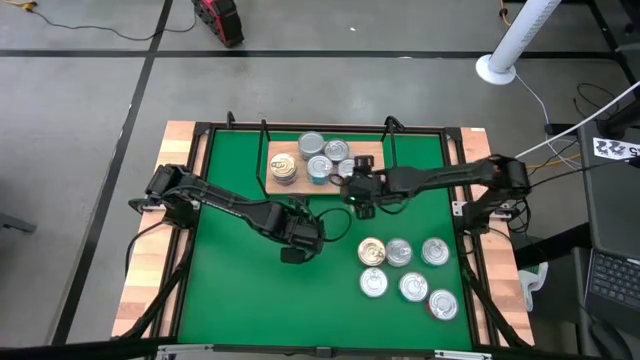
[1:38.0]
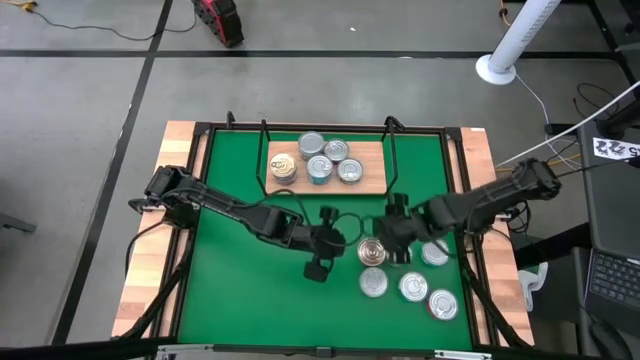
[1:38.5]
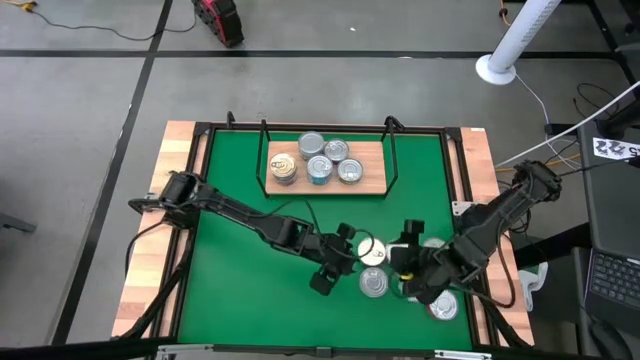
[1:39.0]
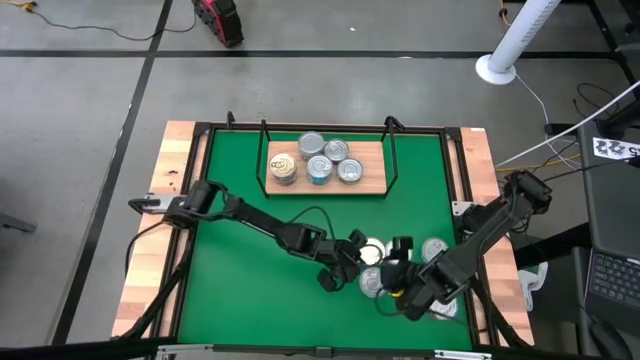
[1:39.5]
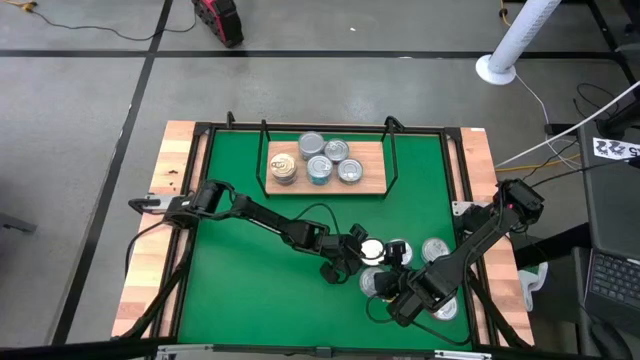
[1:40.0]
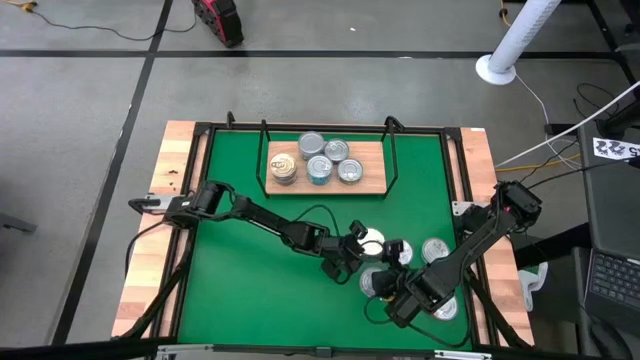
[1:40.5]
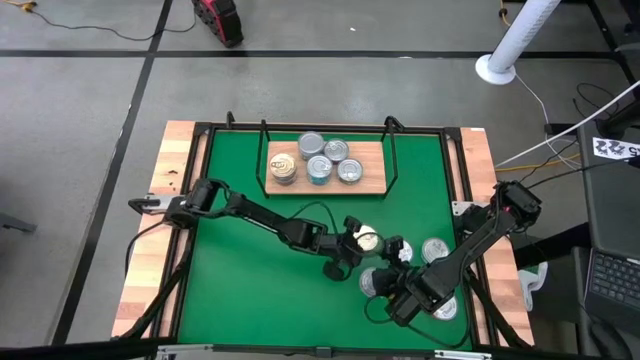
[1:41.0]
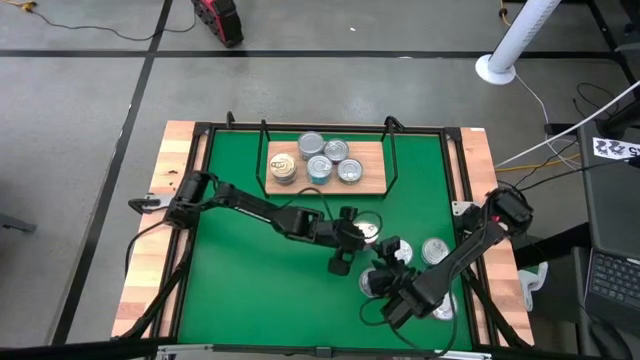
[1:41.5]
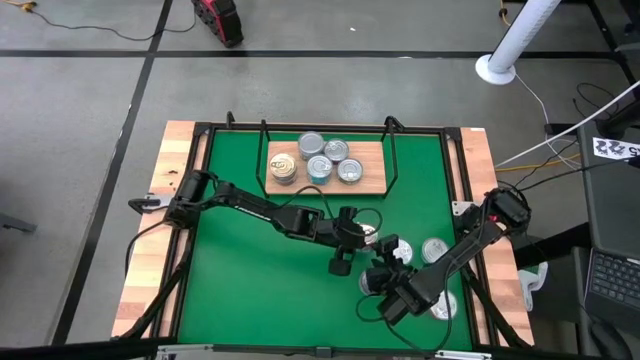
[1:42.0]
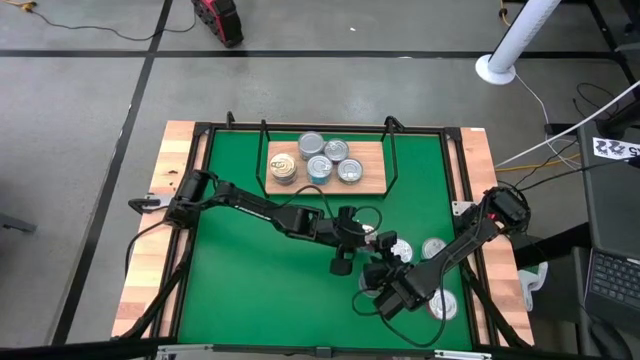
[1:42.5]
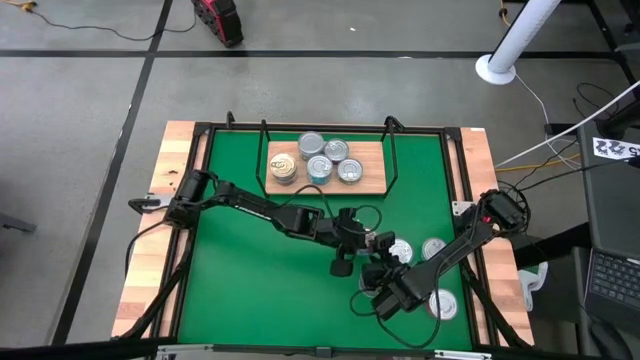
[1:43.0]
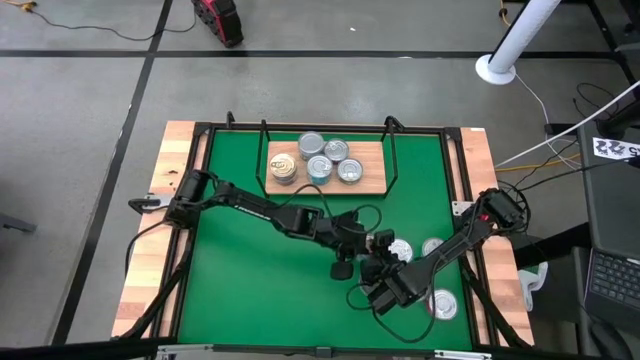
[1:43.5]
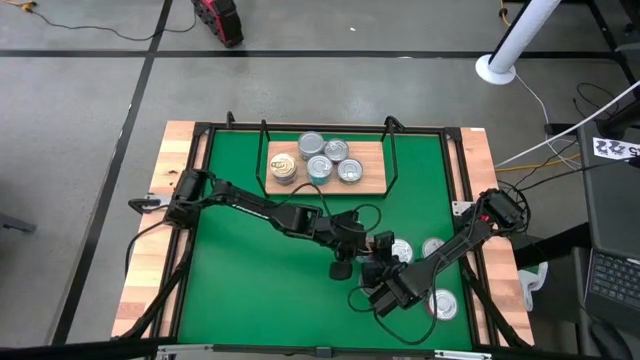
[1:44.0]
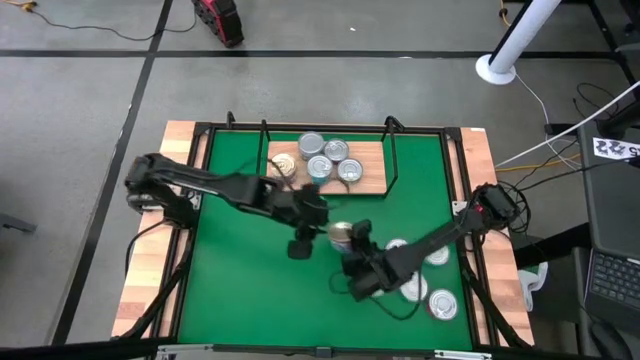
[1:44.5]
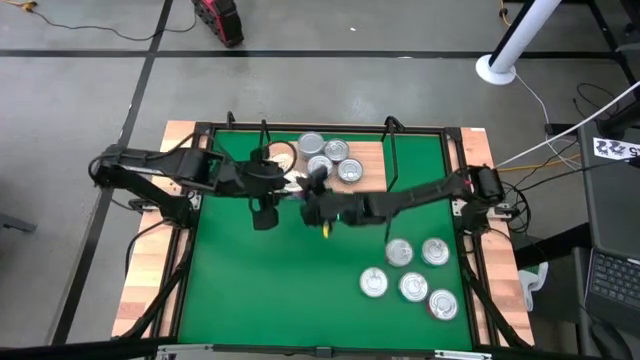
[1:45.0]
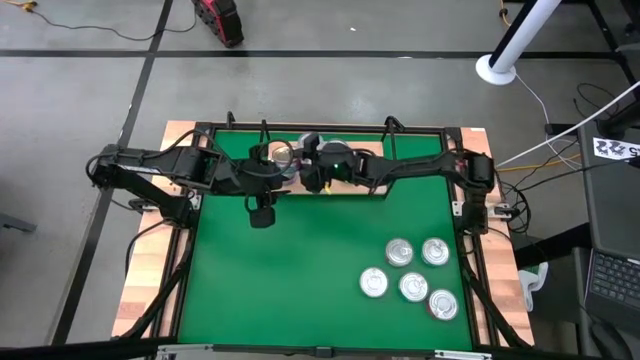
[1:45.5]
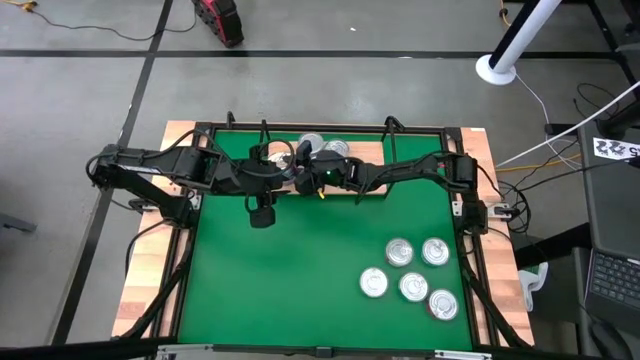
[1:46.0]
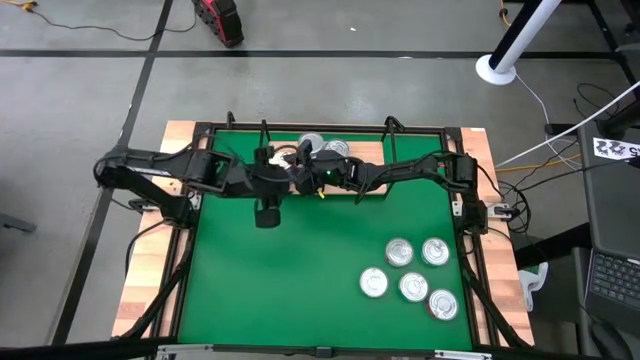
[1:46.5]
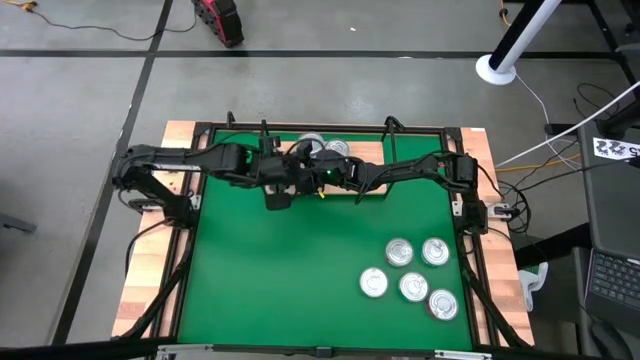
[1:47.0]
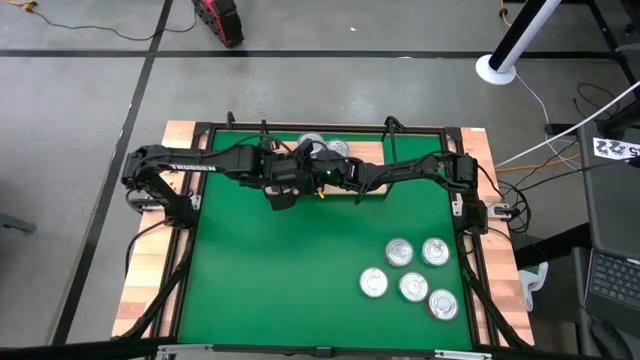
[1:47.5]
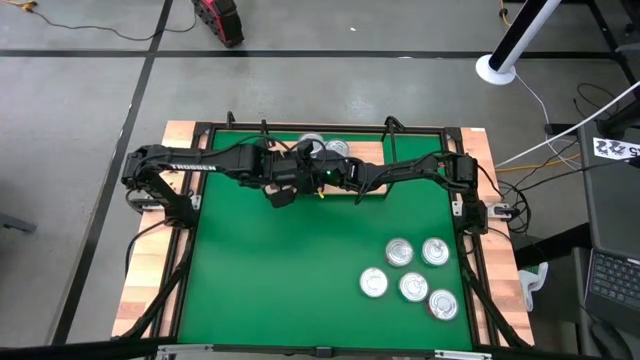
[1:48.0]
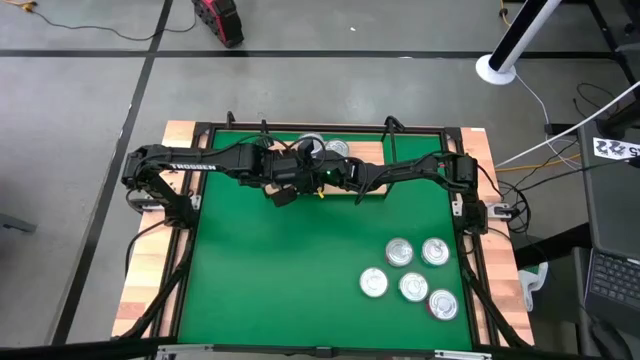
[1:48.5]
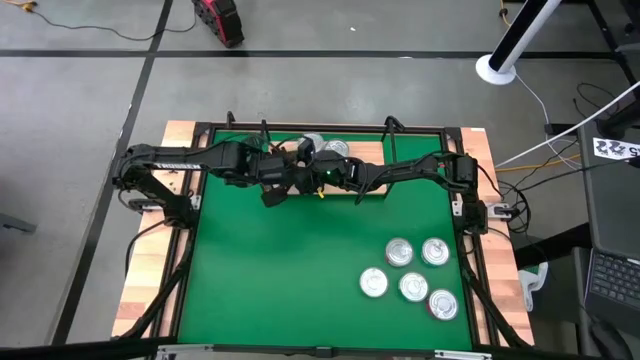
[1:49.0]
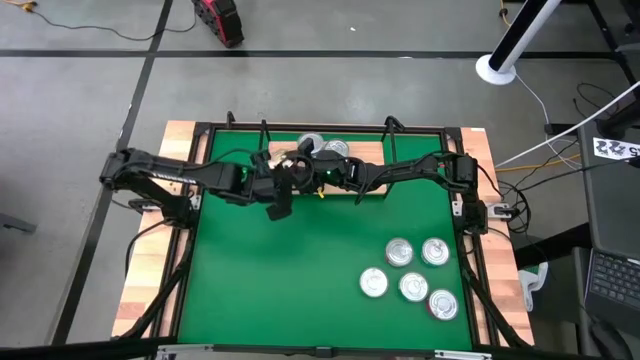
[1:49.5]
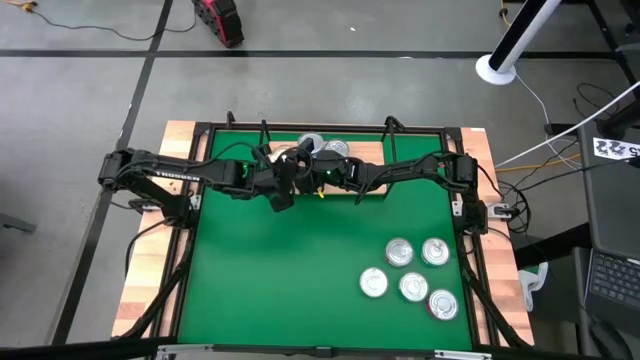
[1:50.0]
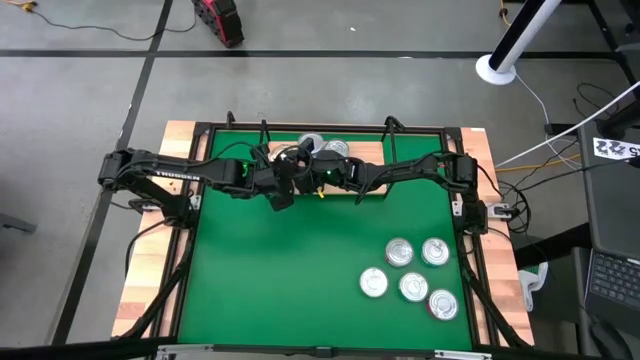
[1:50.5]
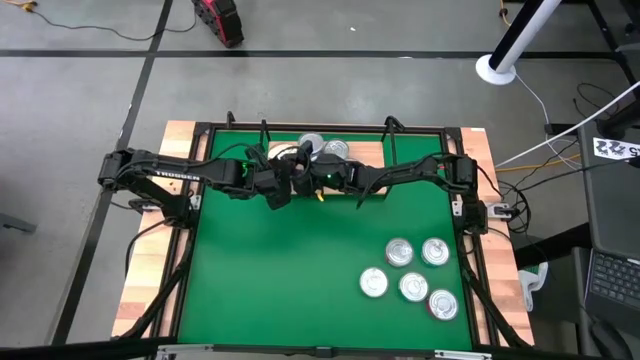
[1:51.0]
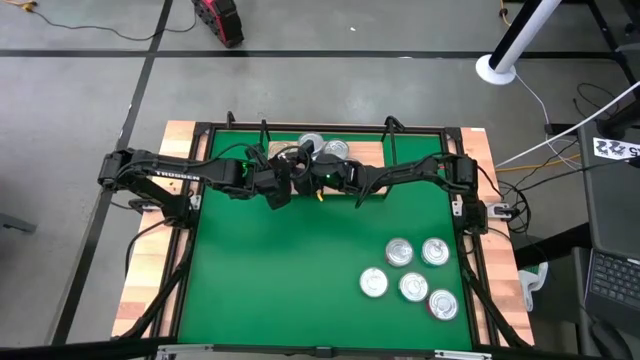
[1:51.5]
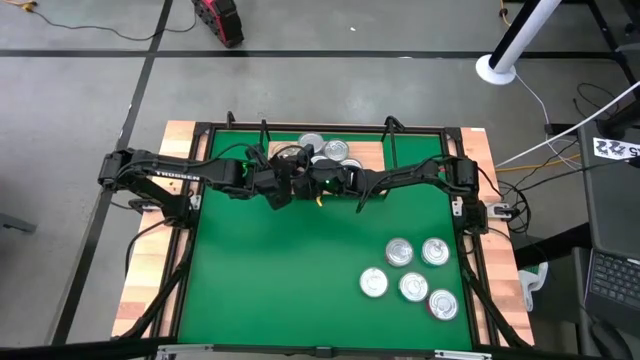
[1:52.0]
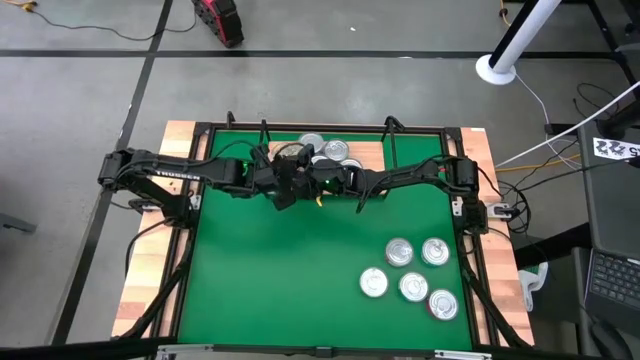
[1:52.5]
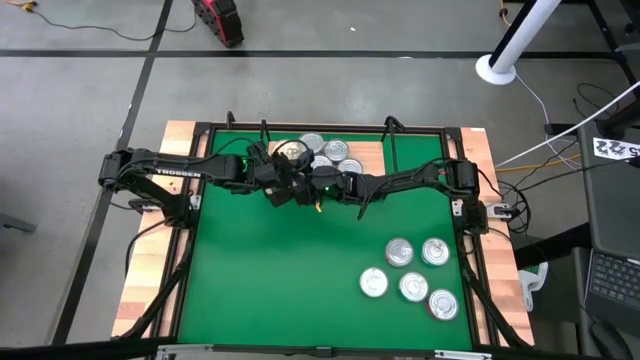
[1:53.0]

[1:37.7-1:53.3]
Task: Stack canned seafood by type on shelf
Stack the blue pink tuna can on top of the other blue pink tuna cans on the shelf

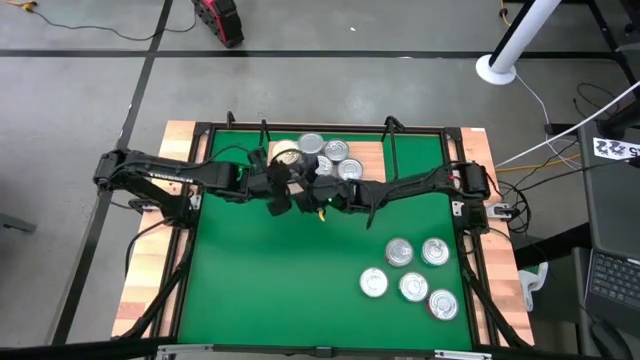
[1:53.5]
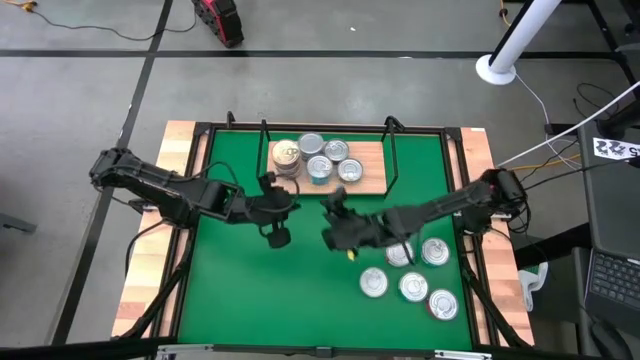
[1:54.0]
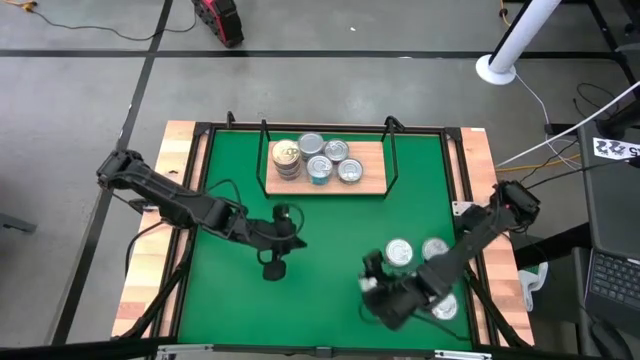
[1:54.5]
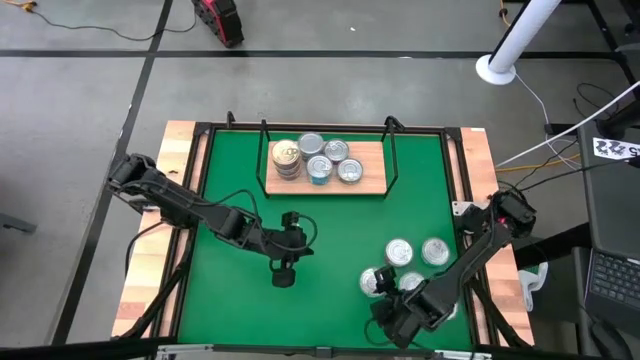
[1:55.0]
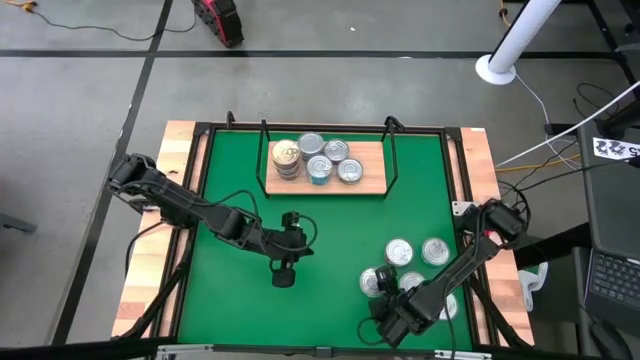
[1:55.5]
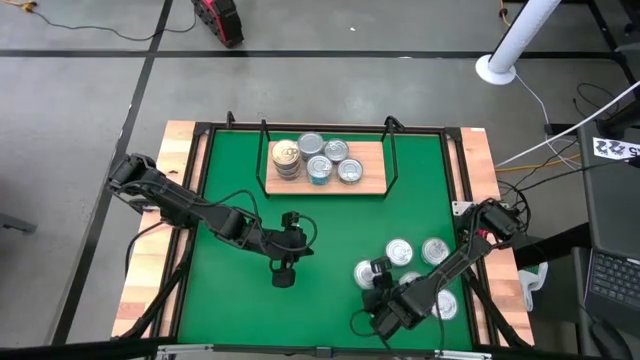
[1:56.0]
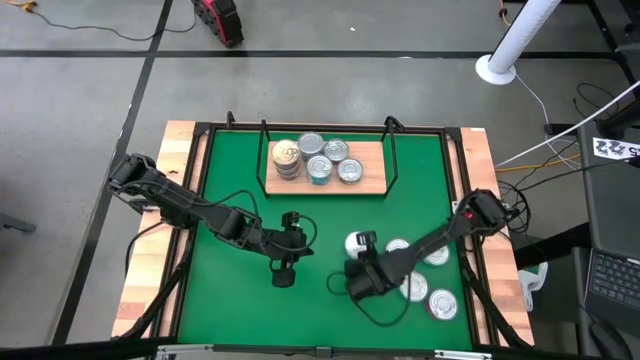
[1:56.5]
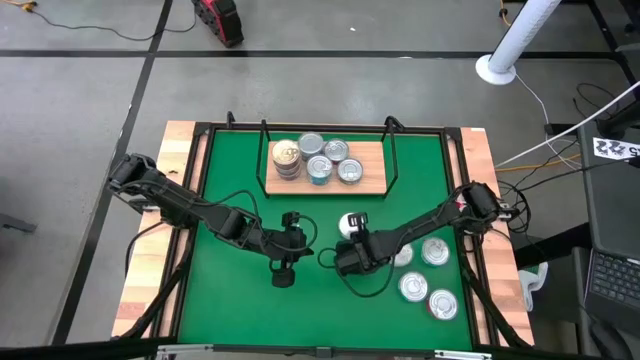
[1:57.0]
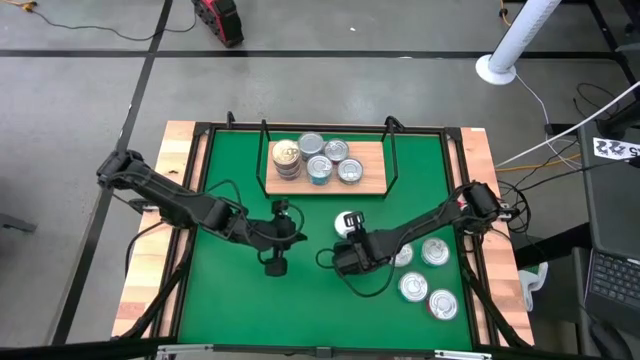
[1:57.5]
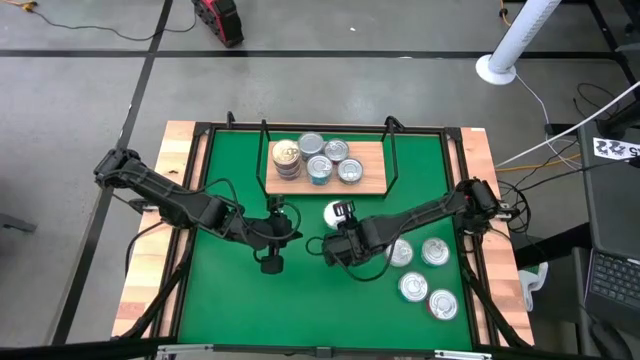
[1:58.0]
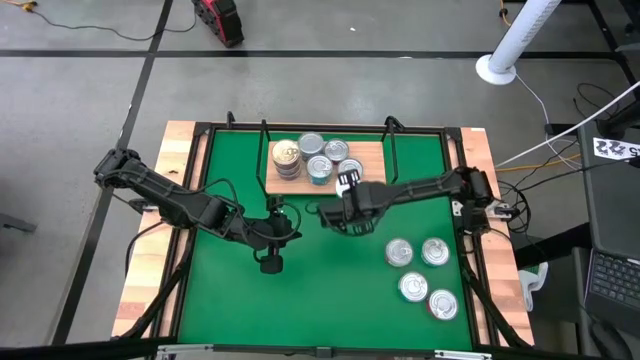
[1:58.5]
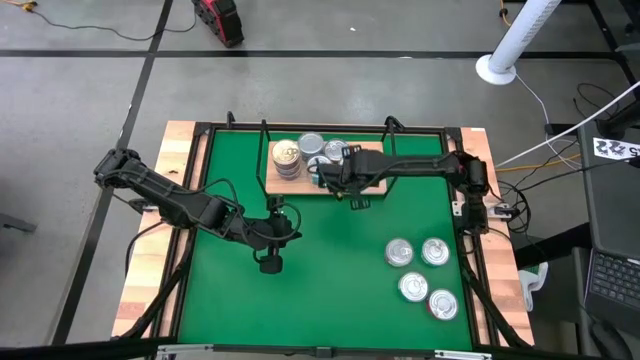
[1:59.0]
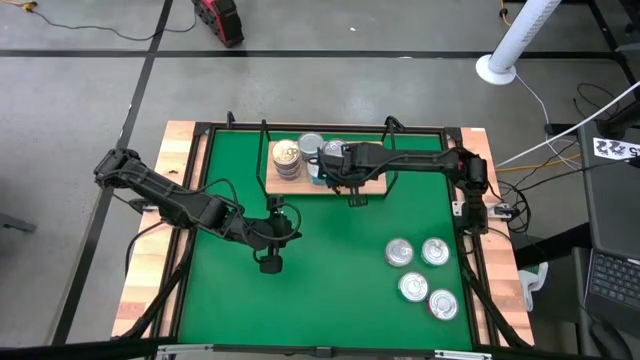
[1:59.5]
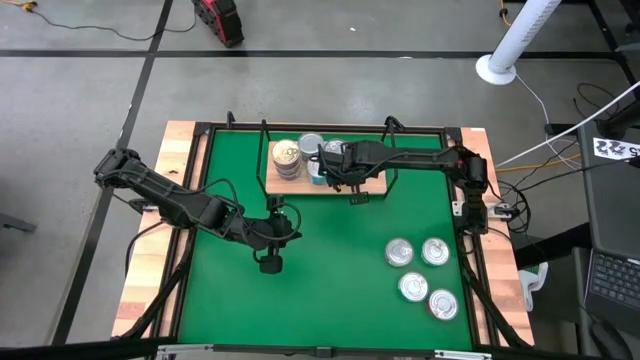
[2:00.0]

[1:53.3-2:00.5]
Stack the green tuna can on top of the other green tuna can on the shelf
